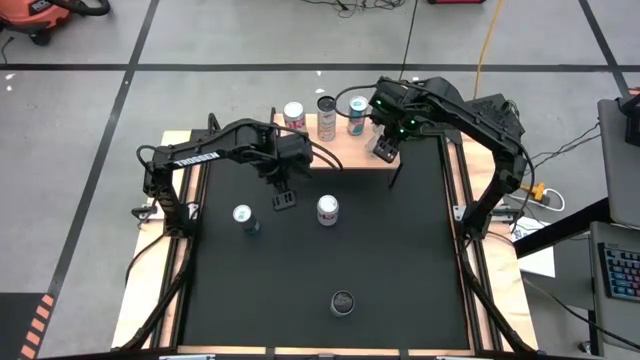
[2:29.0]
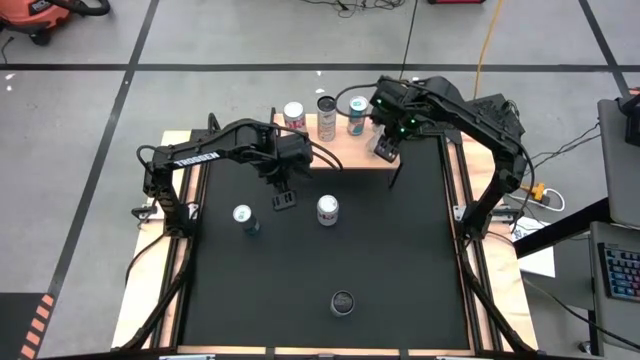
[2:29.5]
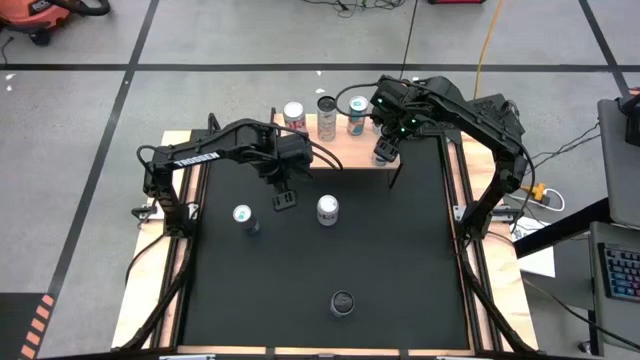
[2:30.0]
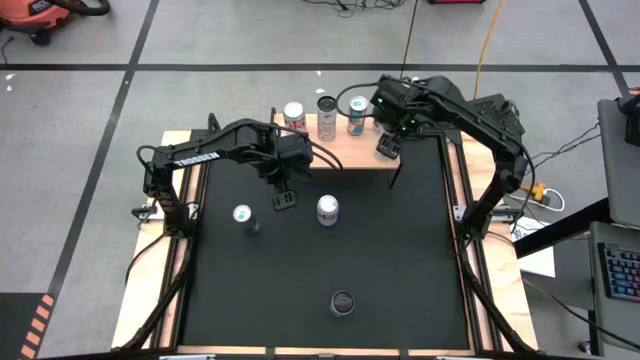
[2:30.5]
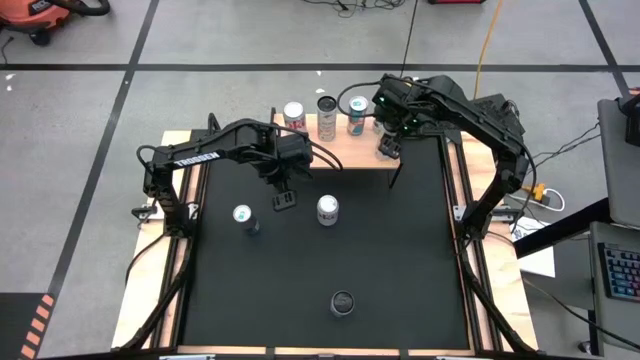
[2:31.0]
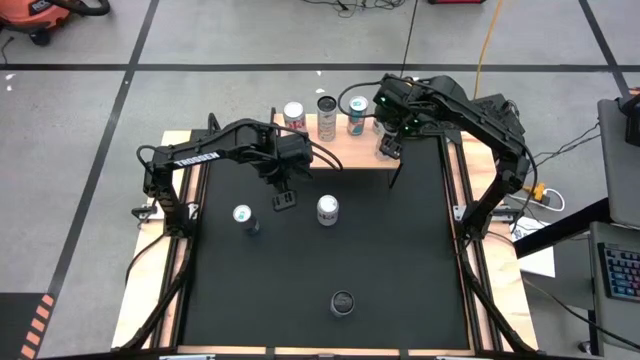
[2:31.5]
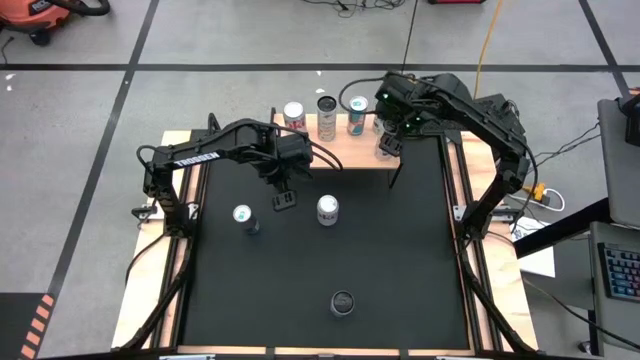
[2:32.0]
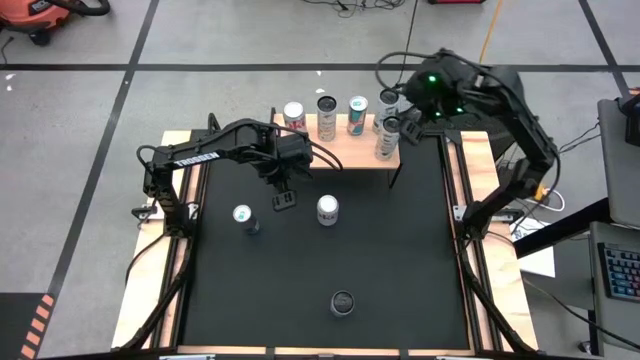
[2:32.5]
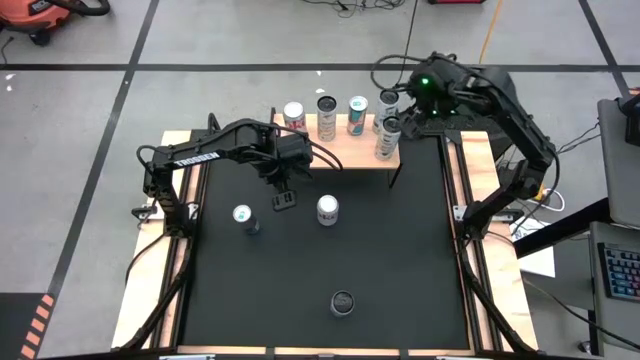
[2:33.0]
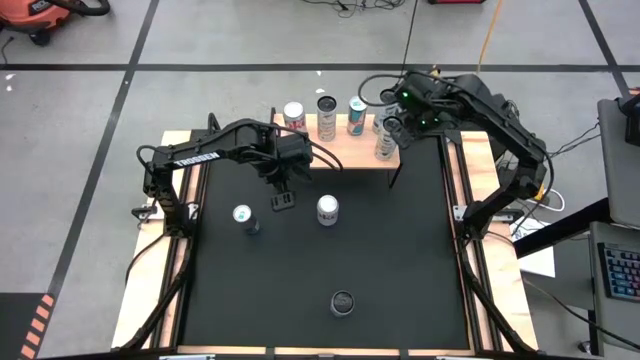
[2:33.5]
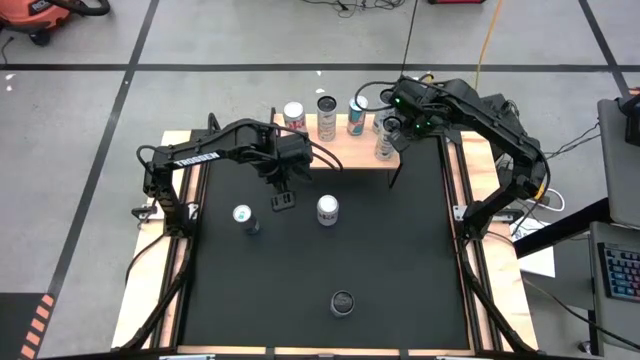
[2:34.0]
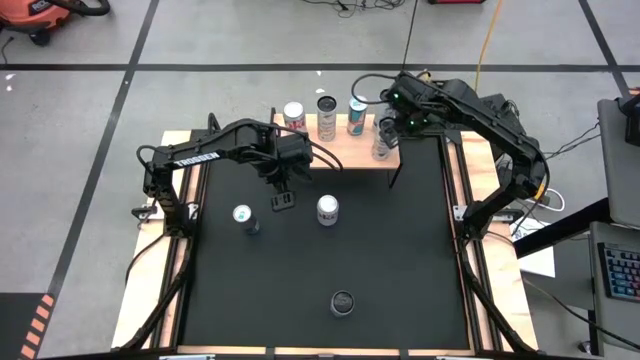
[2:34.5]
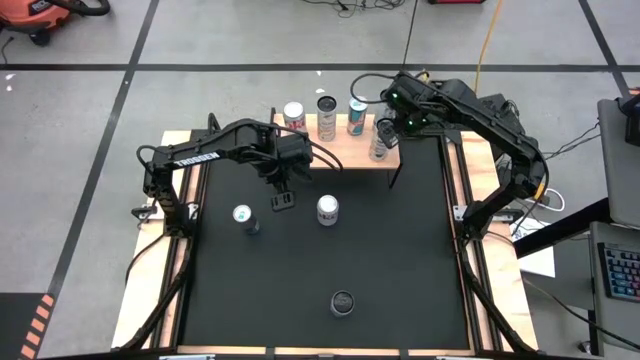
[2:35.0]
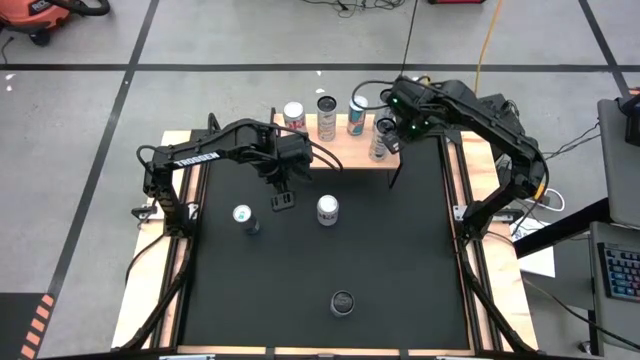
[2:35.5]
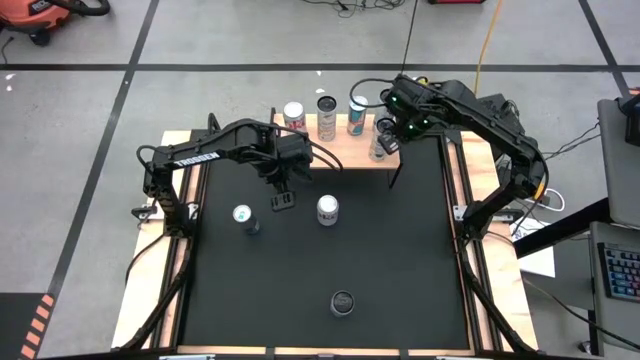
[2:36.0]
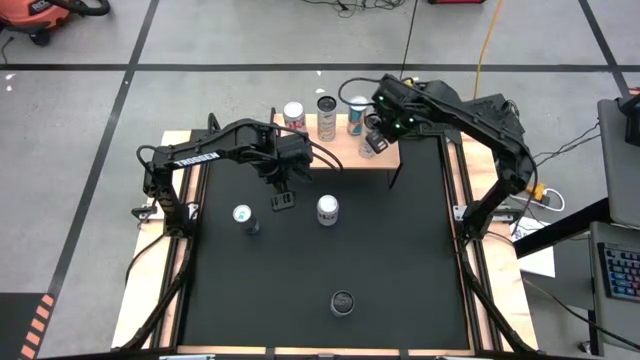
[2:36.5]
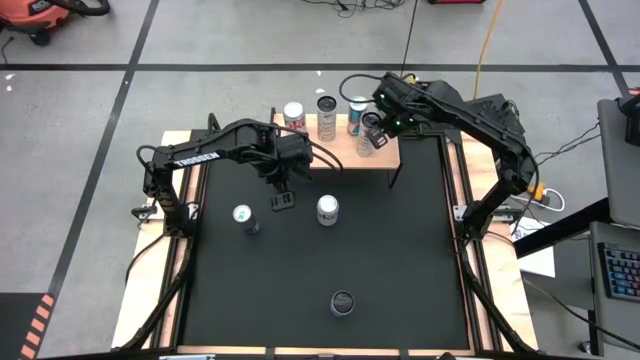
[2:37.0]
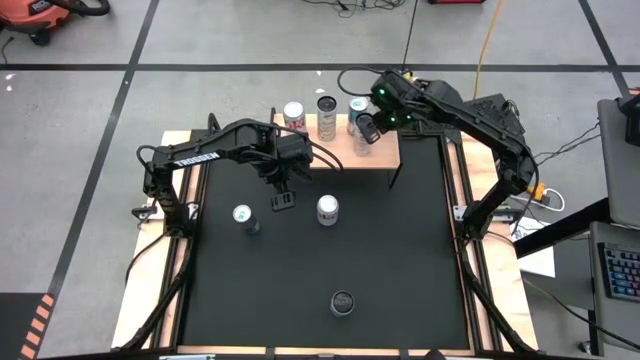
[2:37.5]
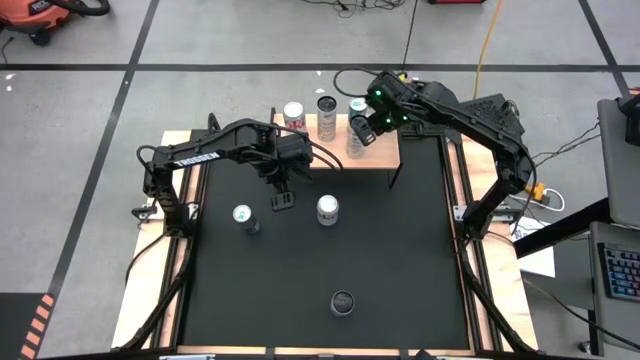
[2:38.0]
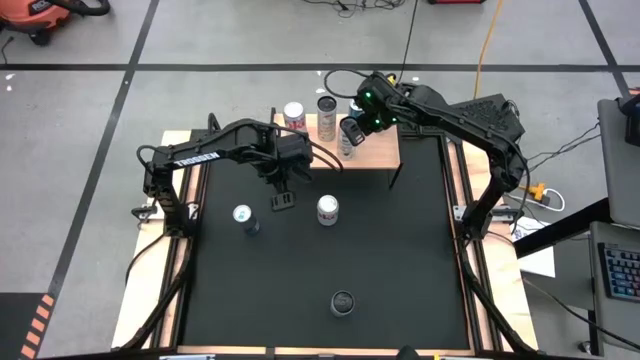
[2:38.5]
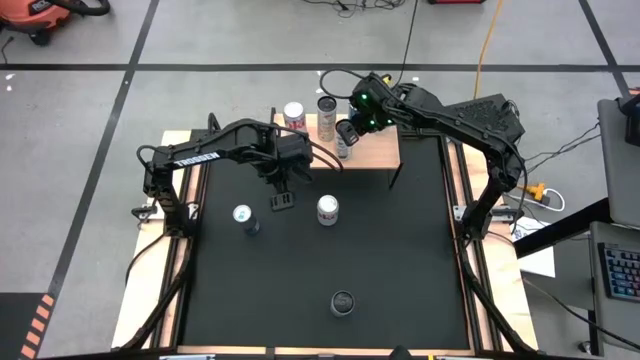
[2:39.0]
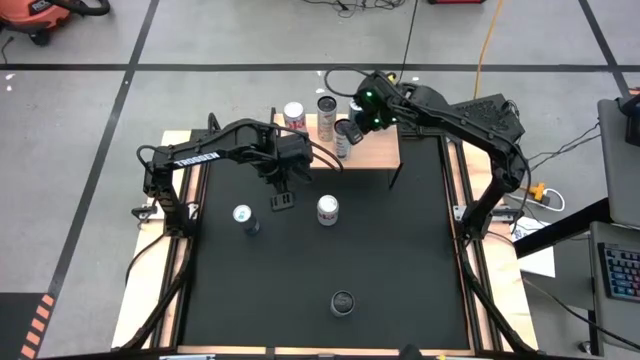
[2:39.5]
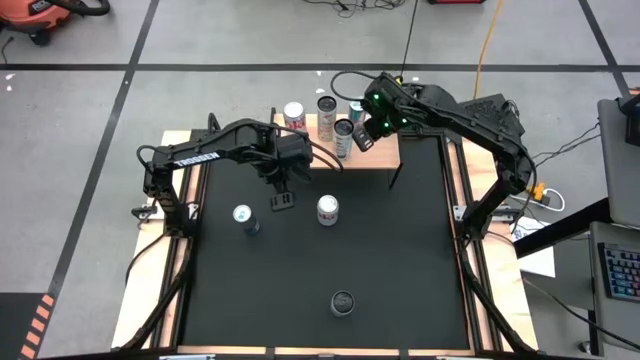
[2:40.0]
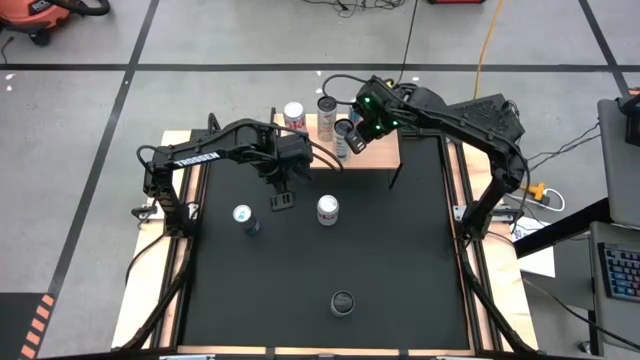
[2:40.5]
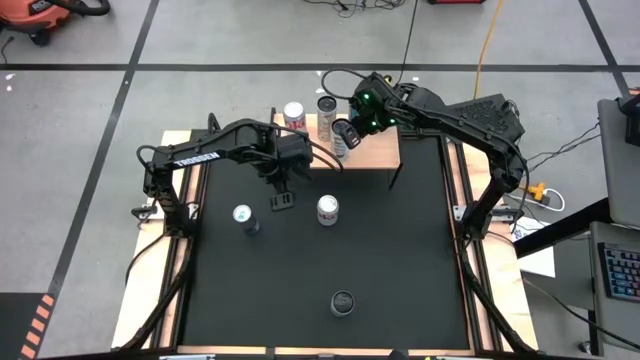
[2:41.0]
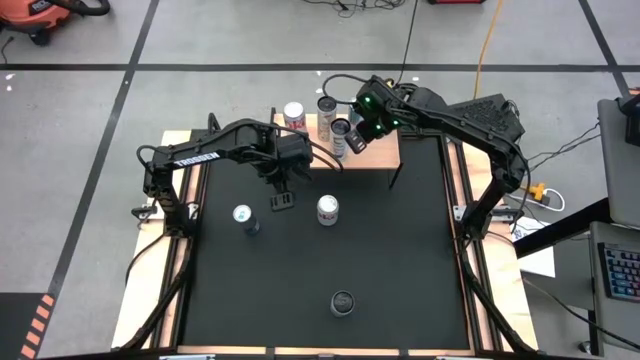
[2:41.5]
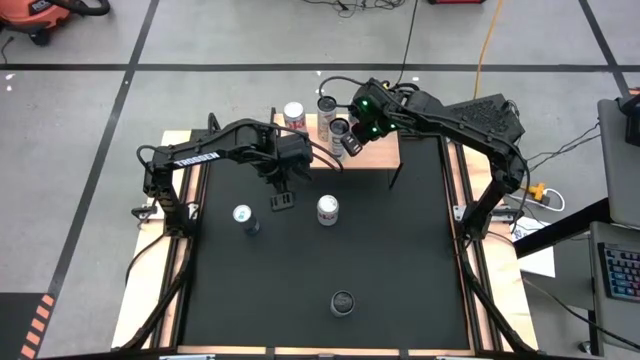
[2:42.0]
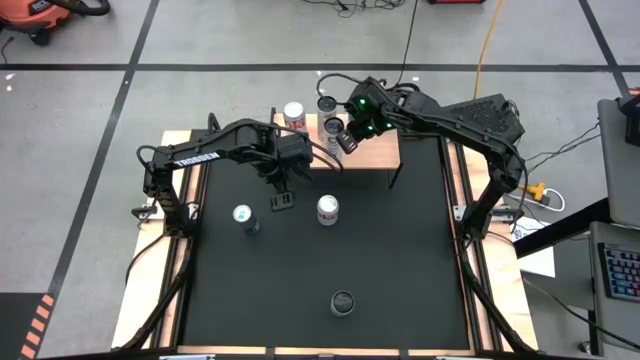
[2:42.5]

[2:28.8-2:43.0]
Task: Place canned beverage on shelf
Put the white and yellow soda can aligned with the other white and yellow soda can on the shelf
